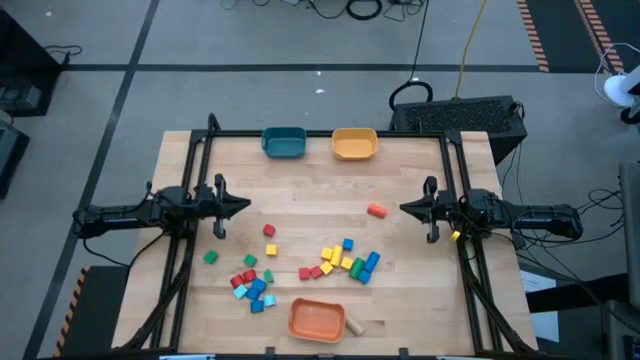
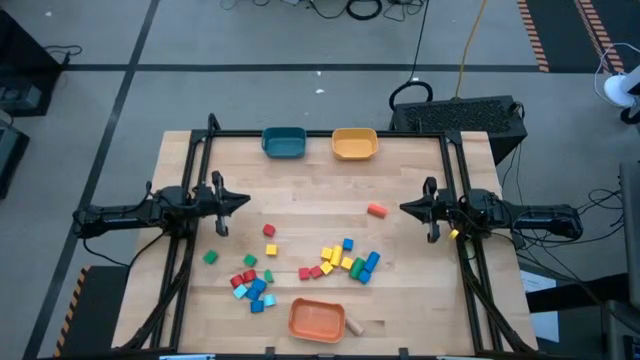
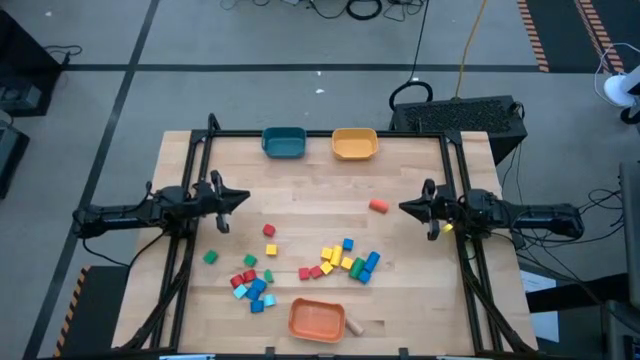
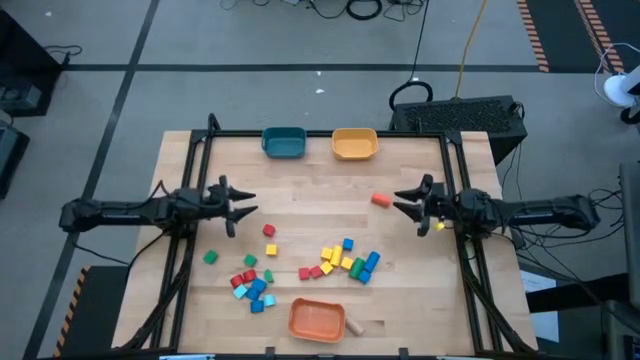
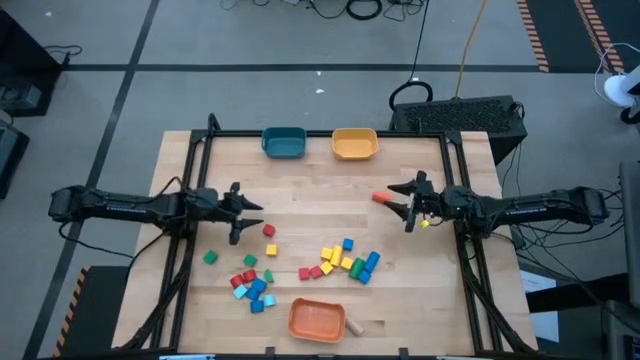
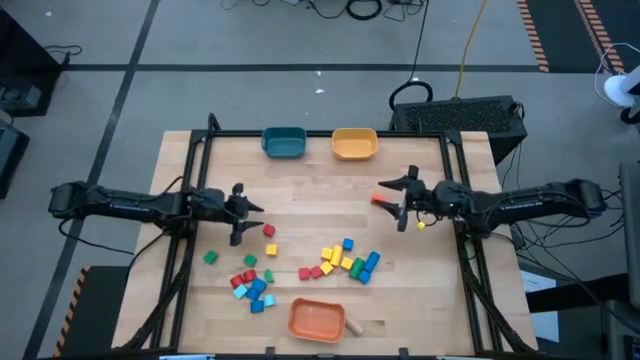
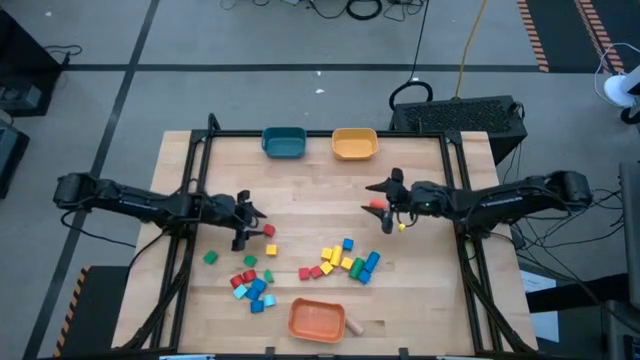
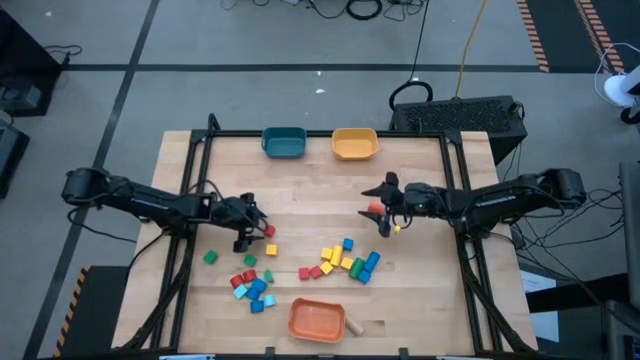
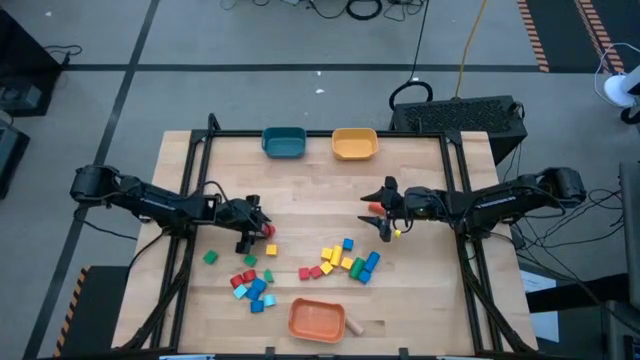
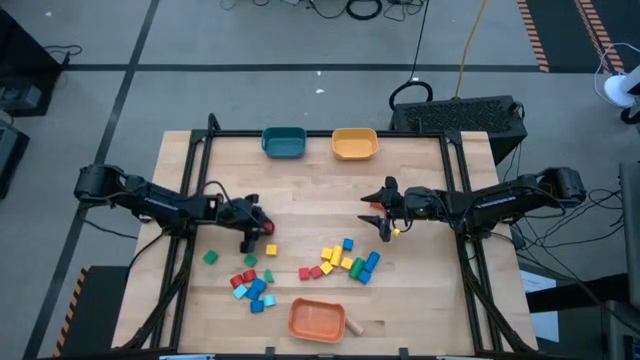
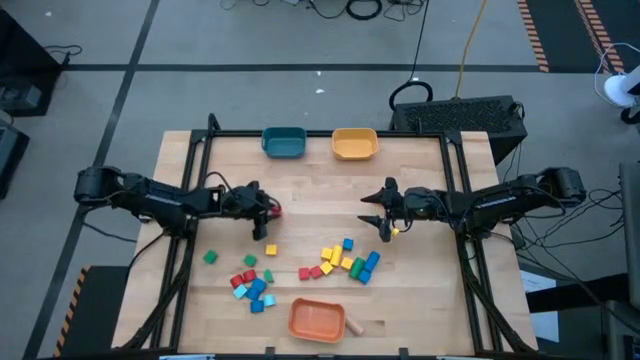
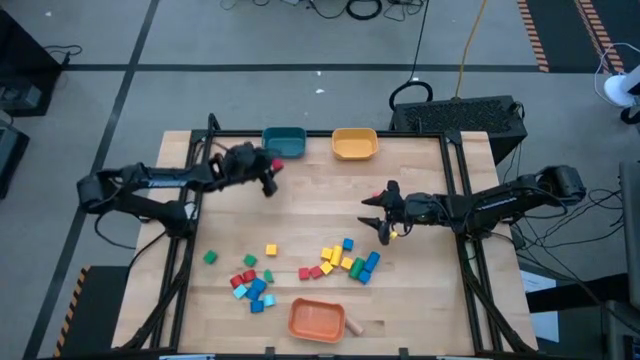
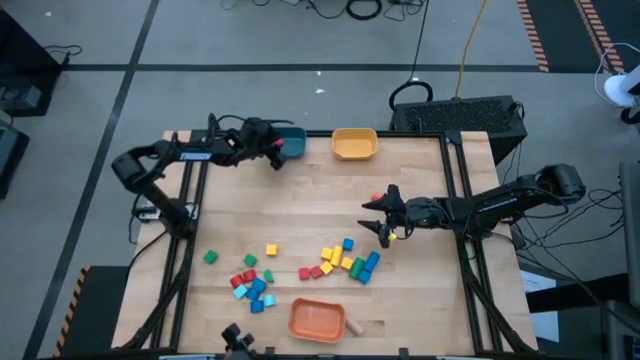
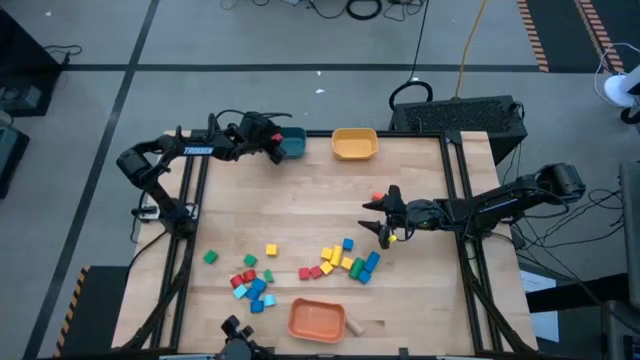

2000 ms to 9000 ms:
Task: Sort blocks by size
Put the red square block into the blue bin

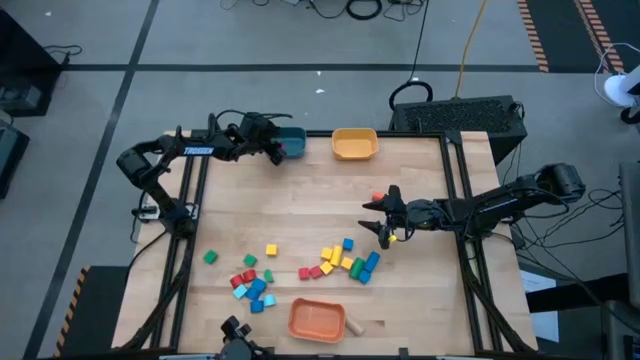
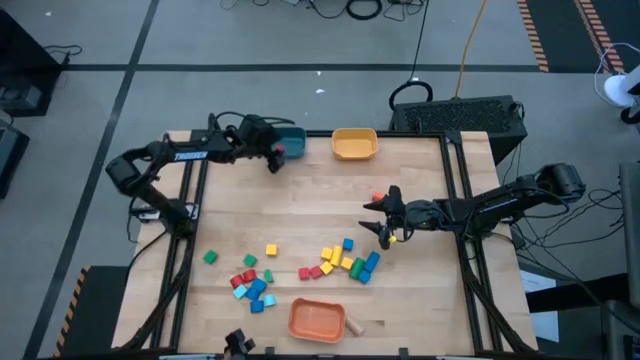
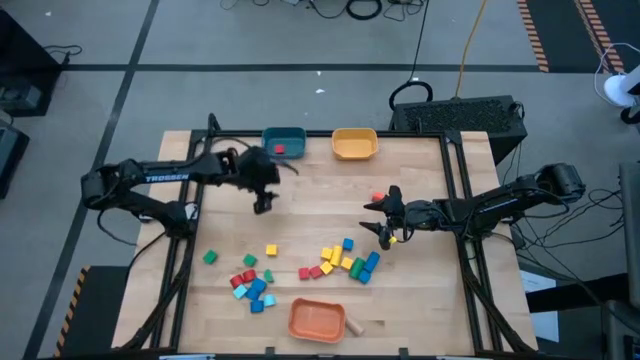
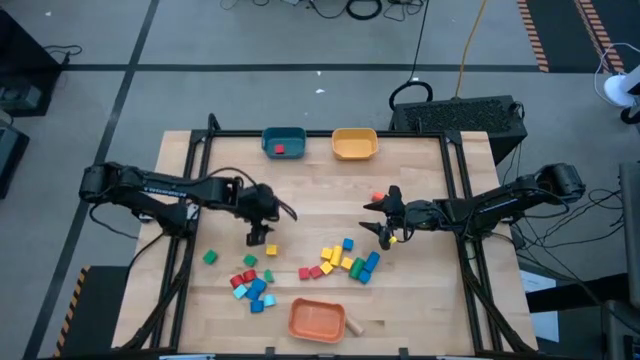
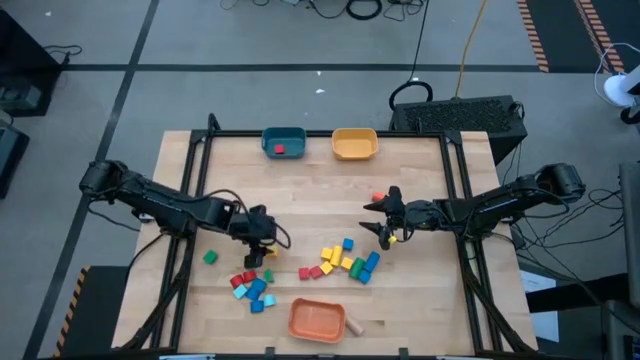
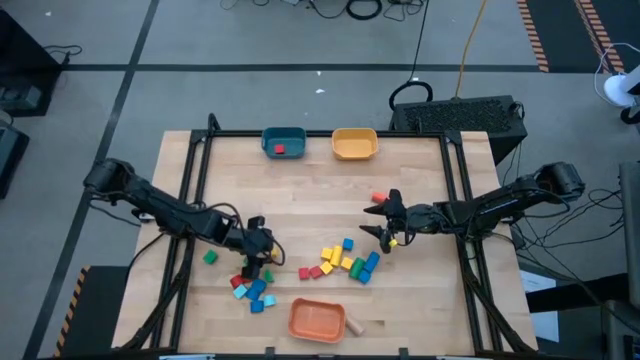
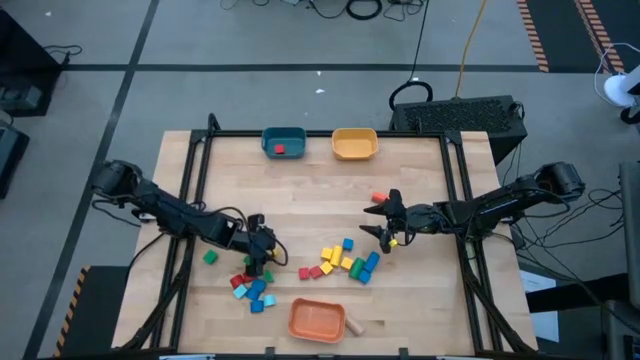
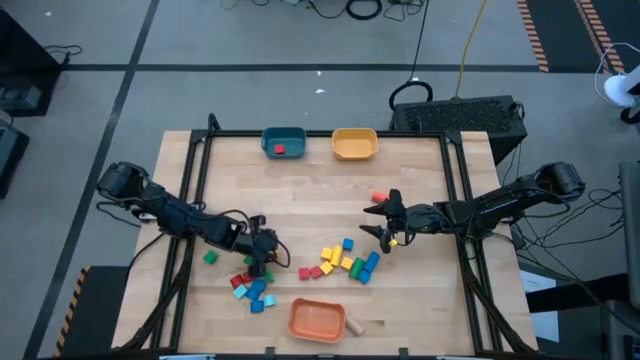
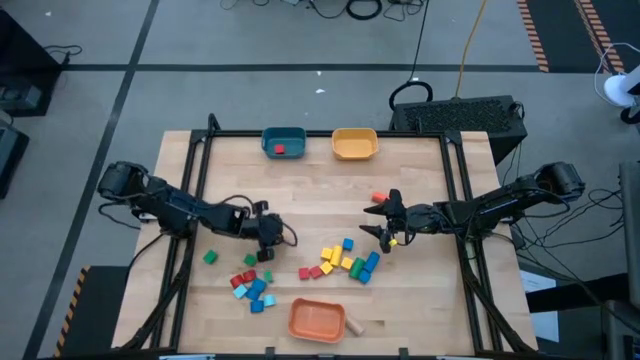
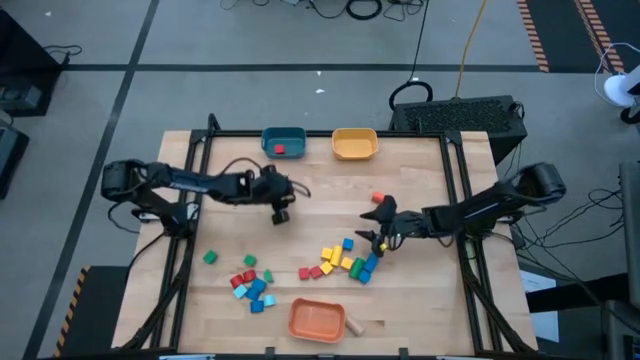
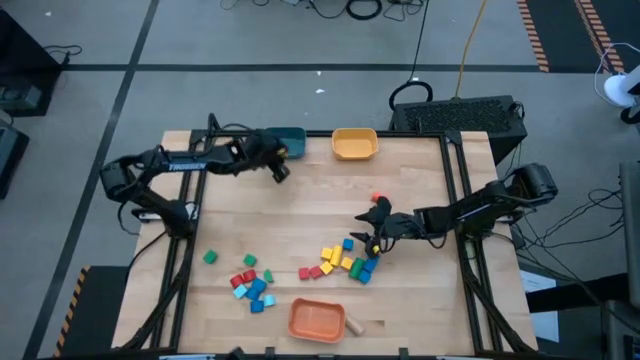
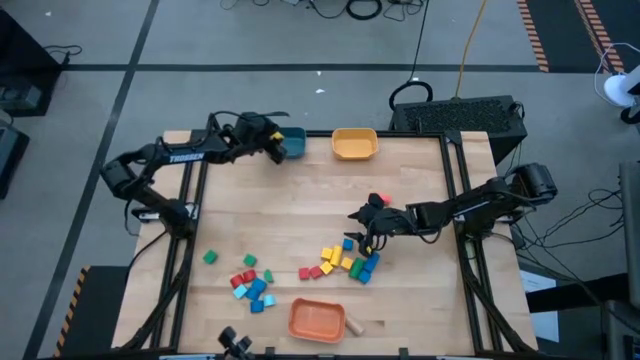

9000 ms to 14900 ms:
Put the yellow square block into the blue bin

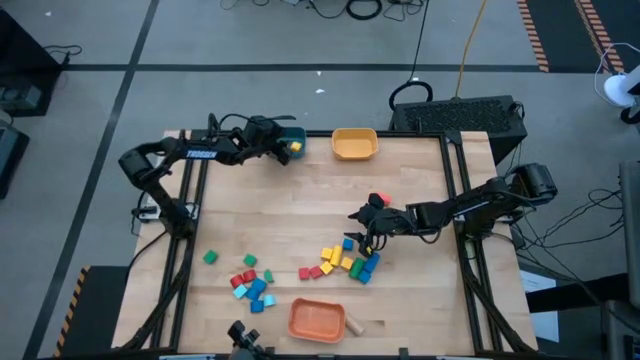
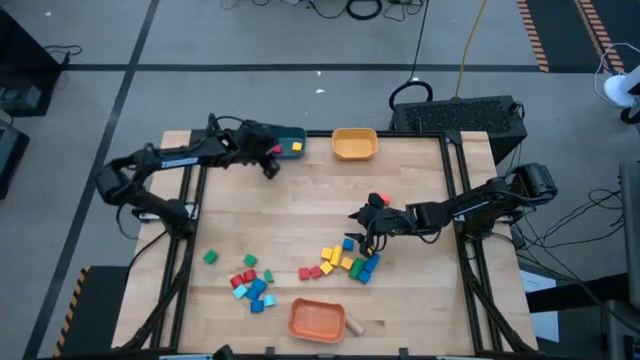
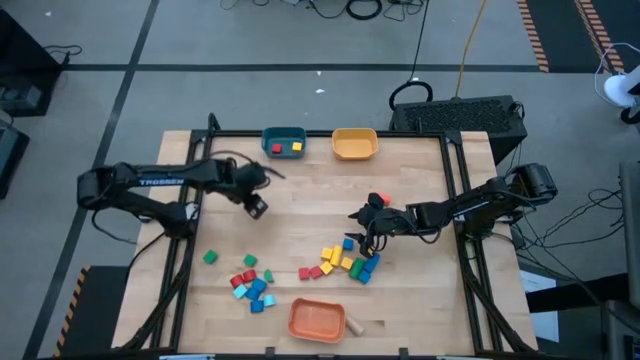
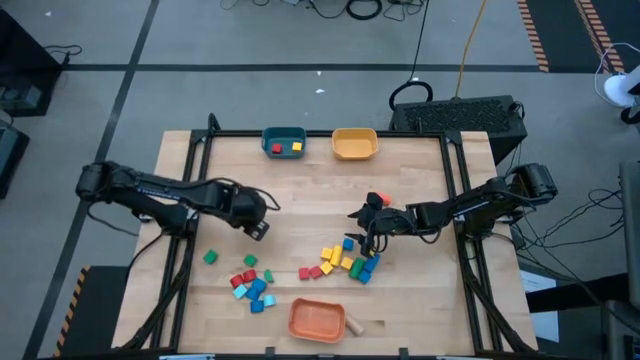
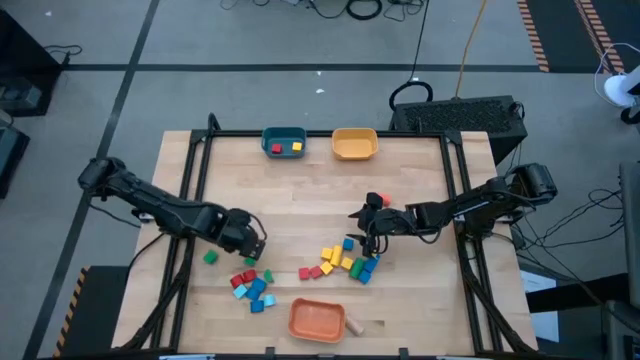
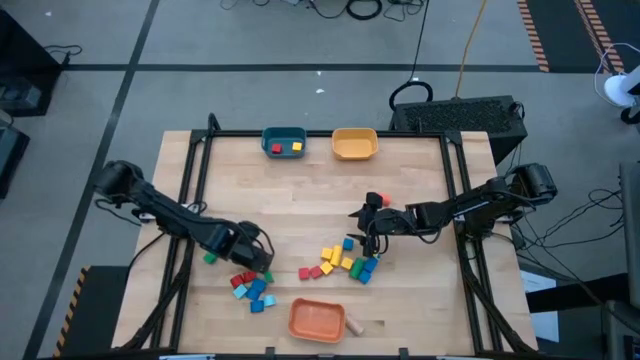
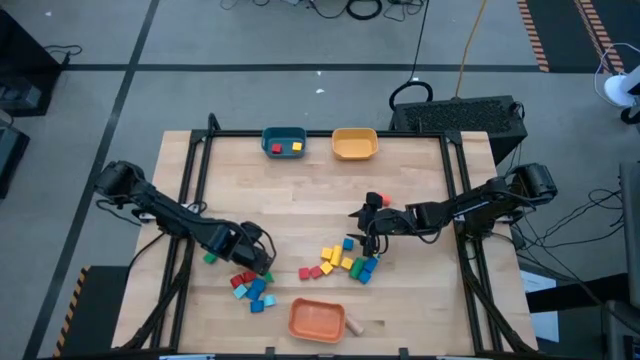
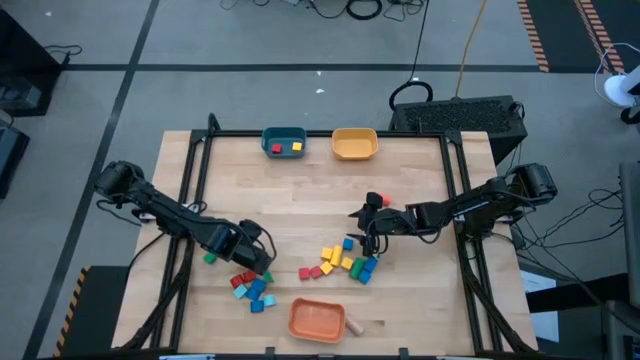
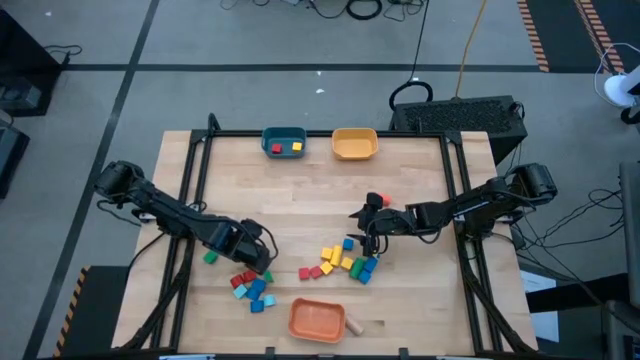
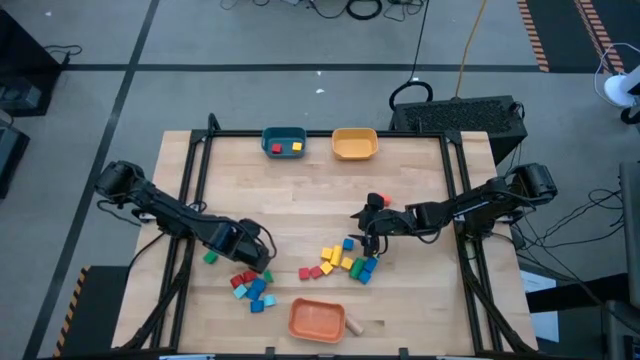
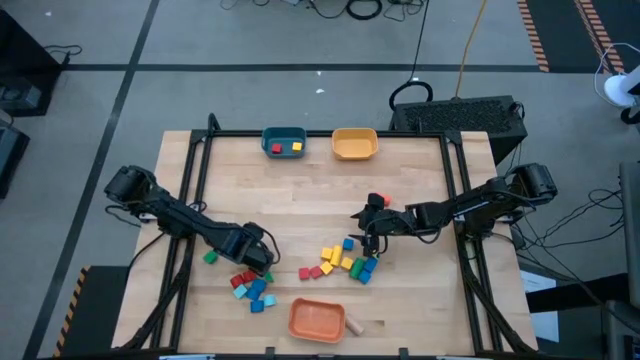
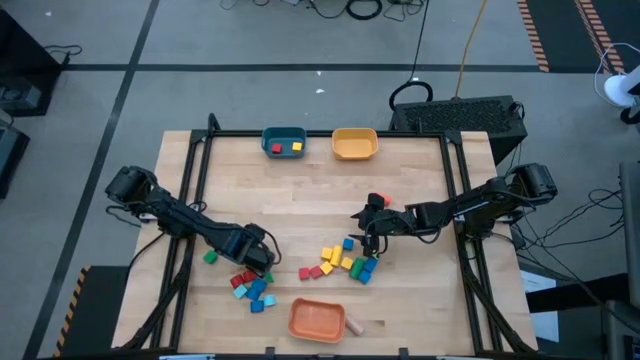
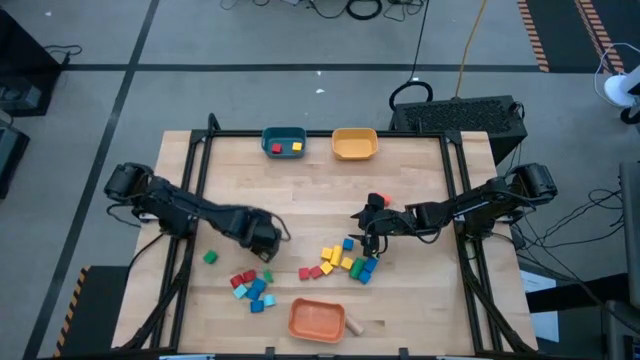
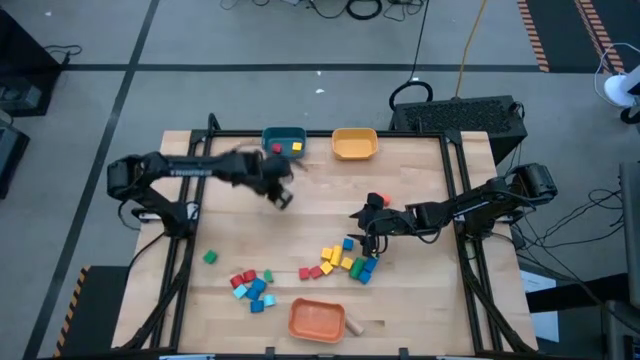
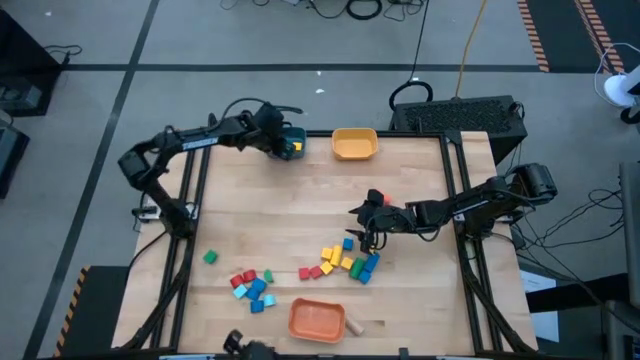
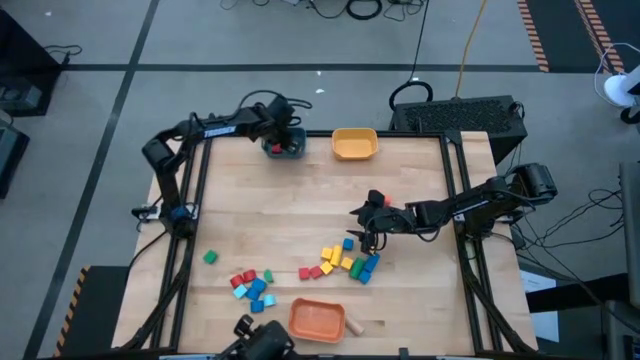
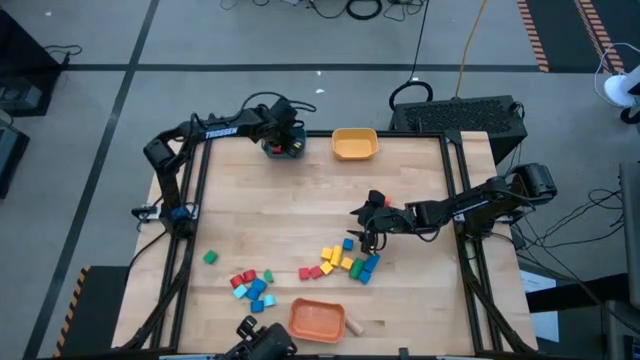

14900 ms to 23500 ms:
Put the green square block into the blue bin
